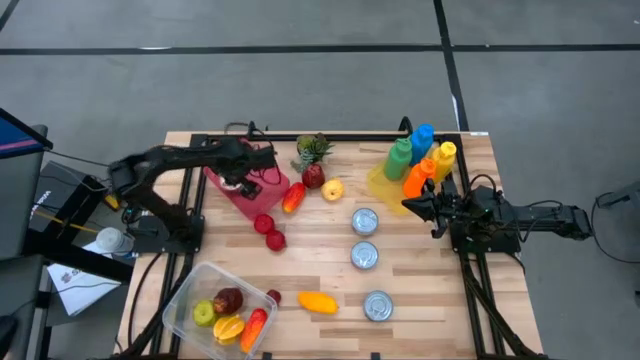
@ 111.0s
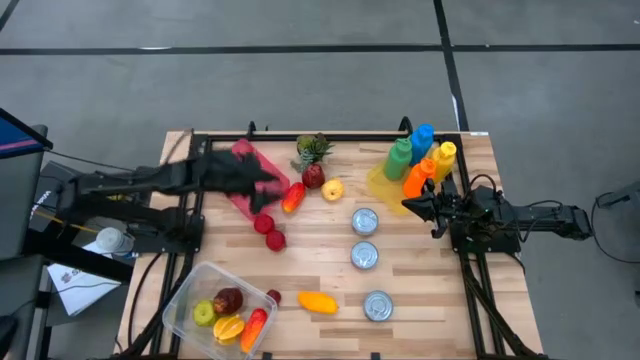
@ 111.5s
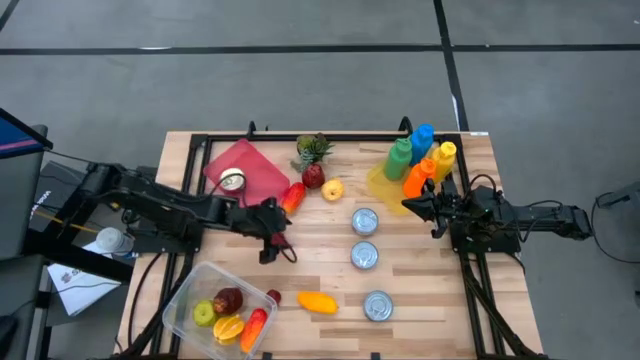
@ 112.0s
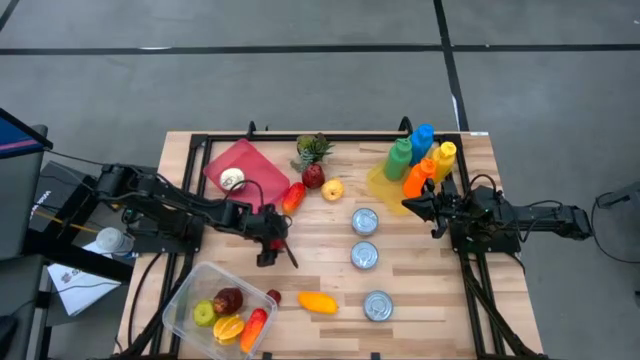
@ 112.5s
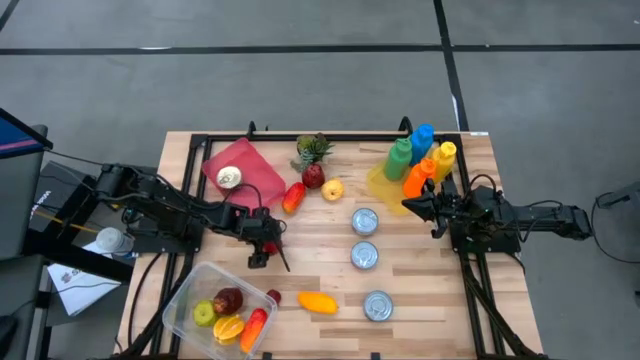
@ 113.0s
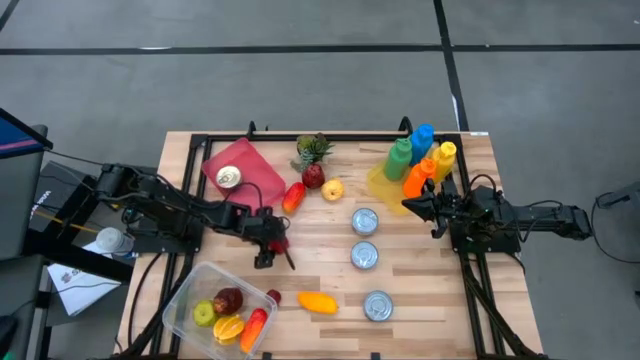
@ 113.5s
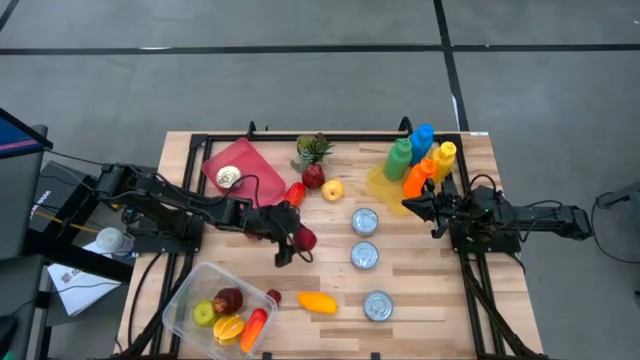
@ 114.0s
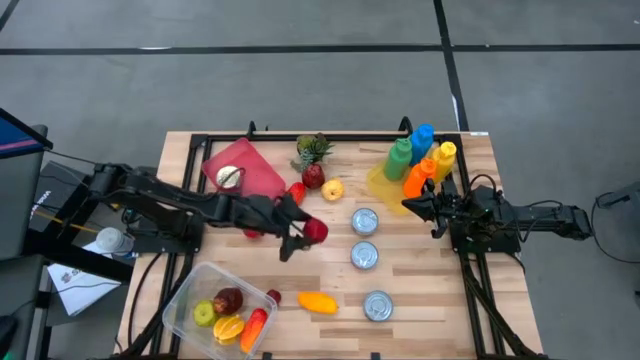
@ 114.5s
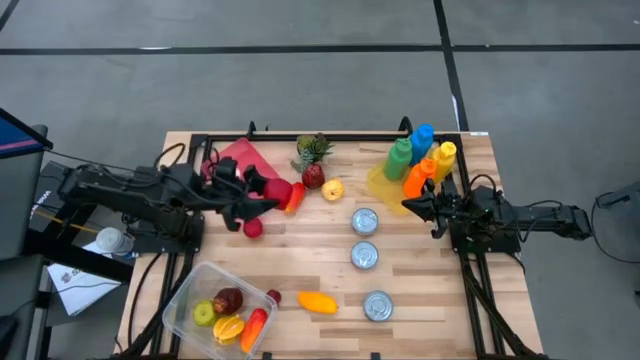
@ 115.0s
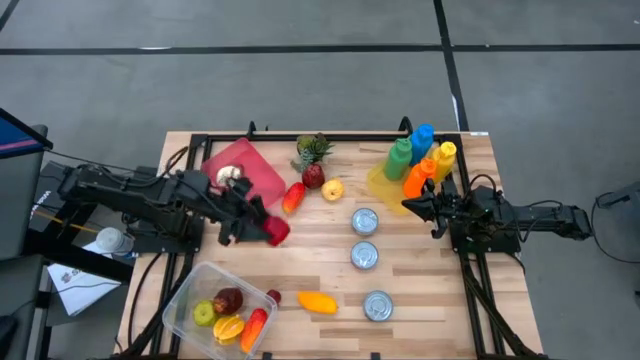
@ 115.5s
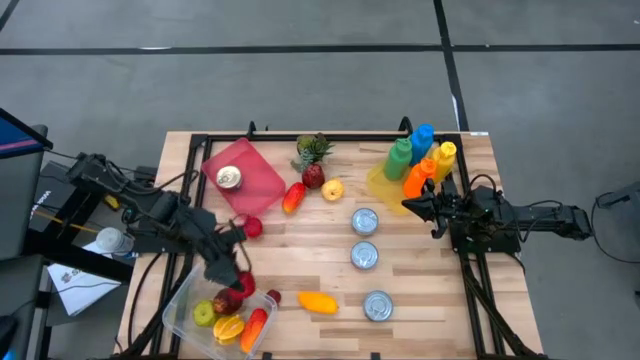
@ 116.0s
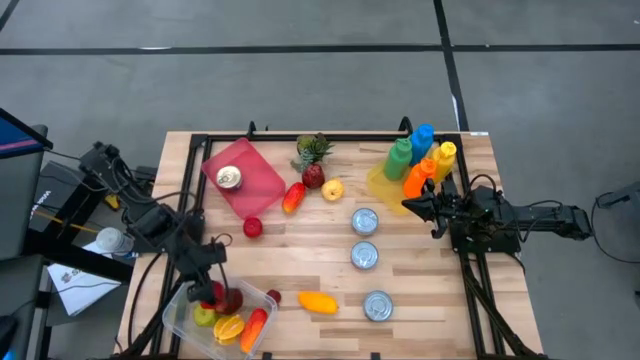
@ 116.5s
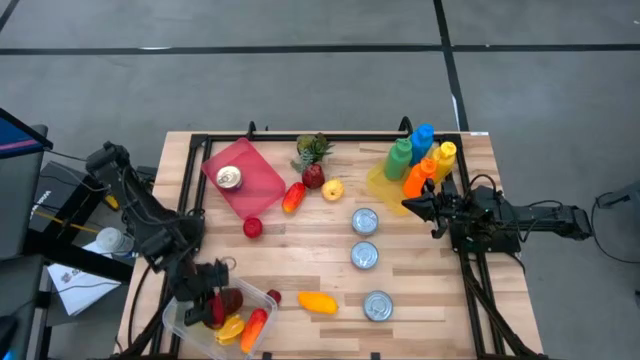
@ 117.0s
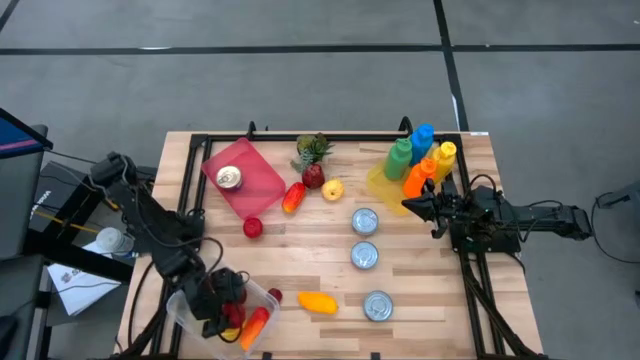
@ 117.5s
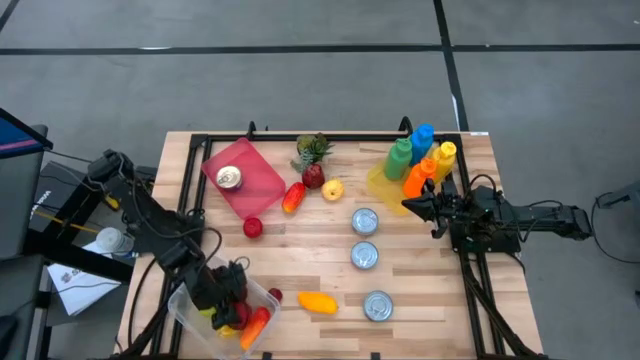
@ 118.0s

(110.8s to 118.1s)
Task: Pick & Place Food Item
Put the bottom red tomato into the transparent bin

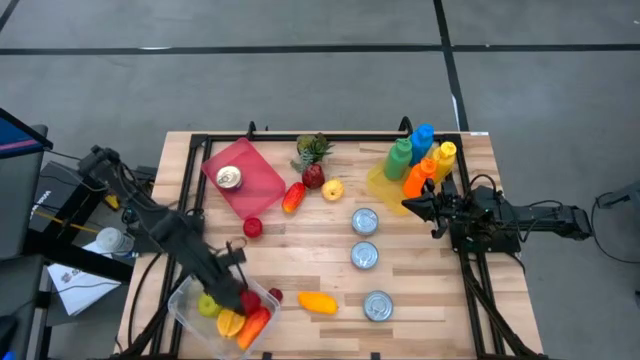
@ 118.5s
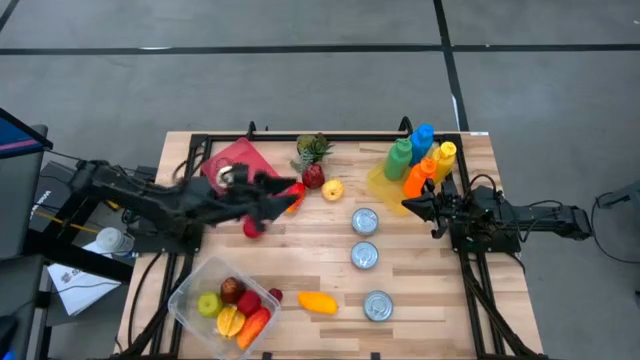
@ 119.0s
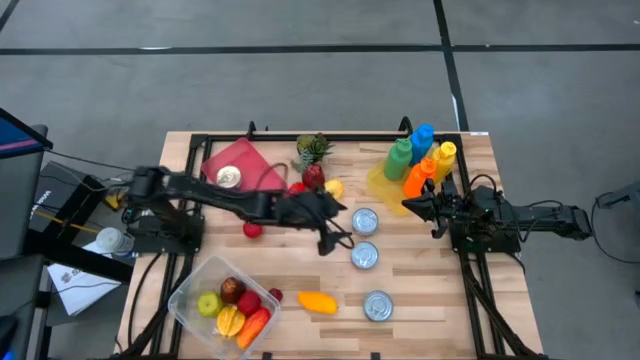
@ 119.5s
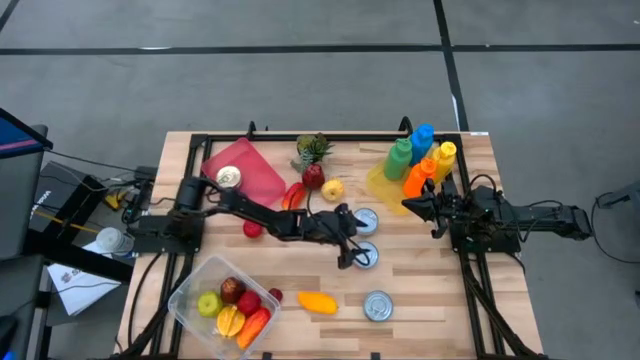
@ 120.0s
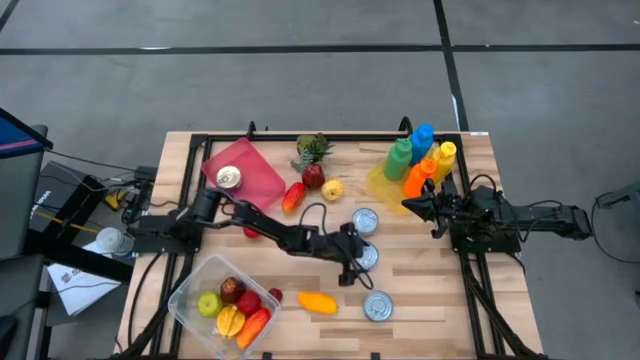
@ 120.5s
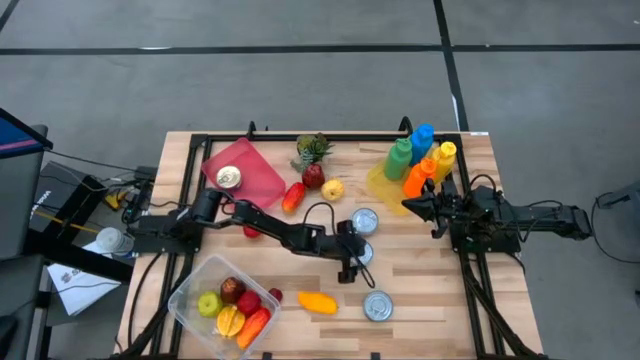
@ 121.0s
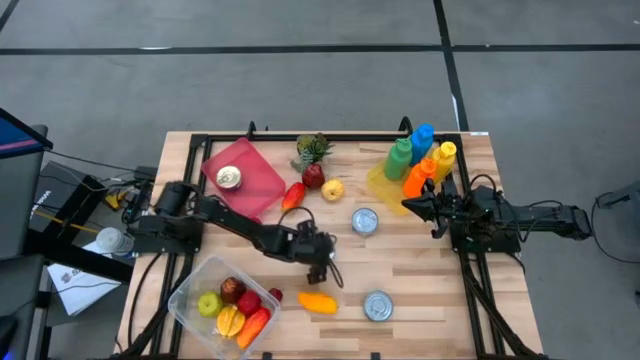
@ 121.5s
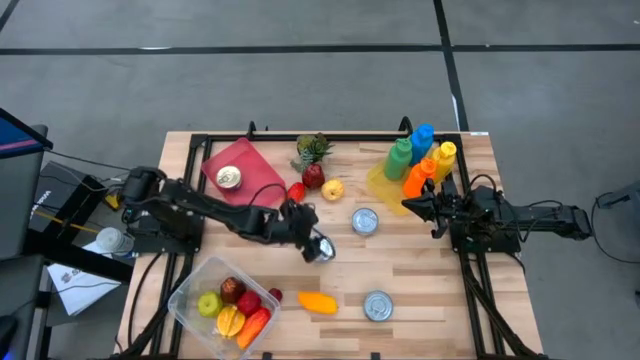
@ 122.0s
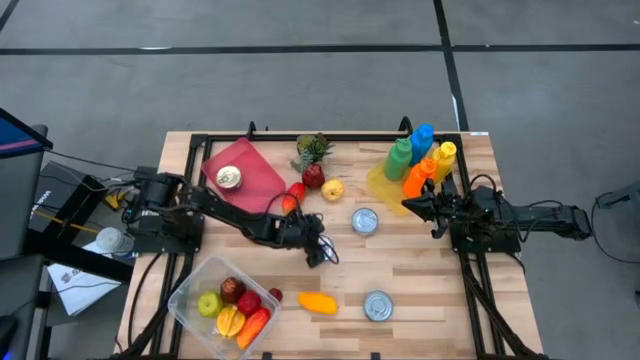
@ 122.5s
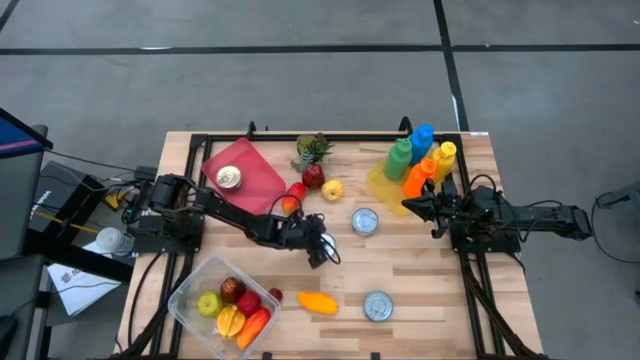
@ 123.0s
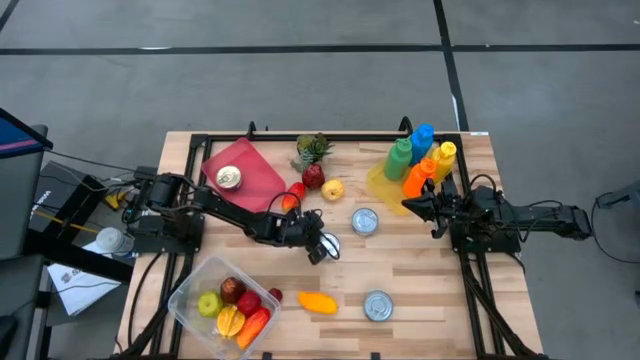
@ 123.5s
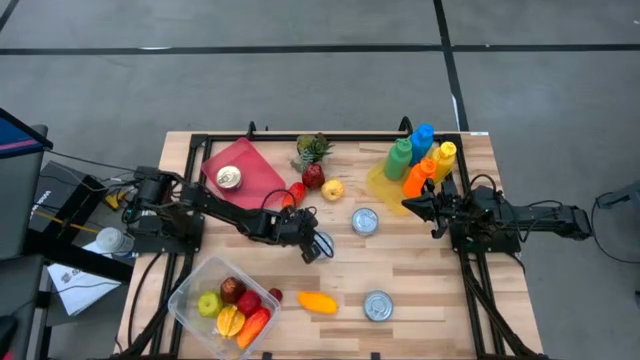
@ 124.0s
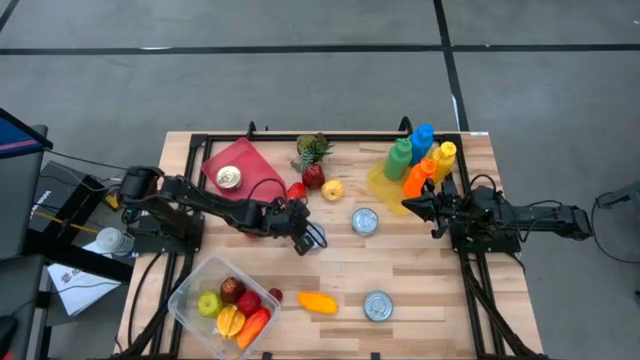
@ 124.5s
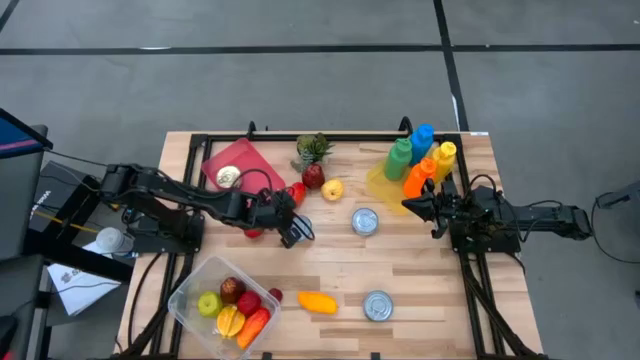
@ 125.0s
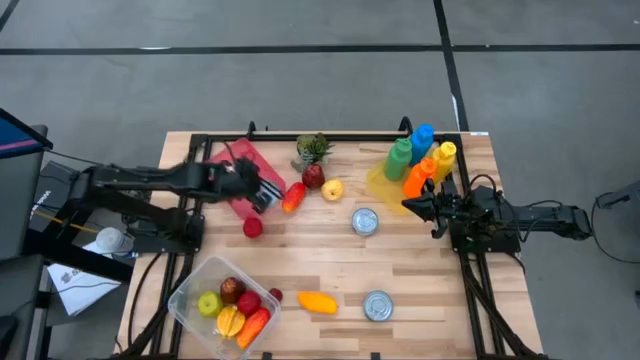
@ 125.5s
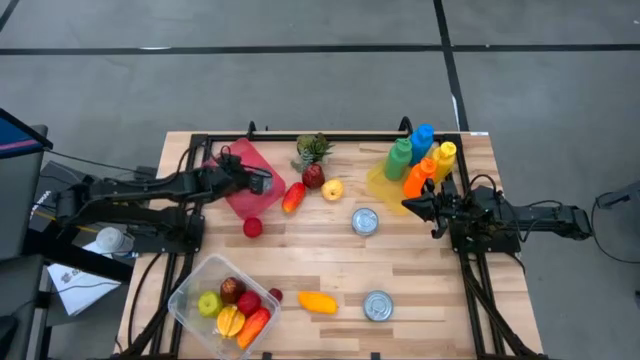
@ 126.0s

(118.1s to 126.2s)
Put the red tuna can into the pink bin

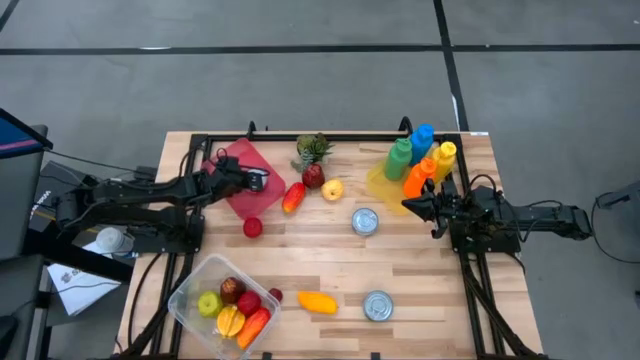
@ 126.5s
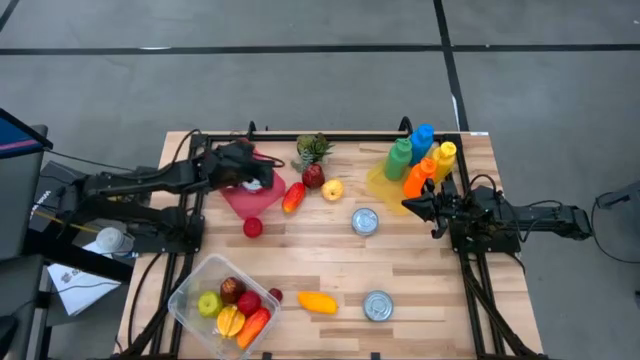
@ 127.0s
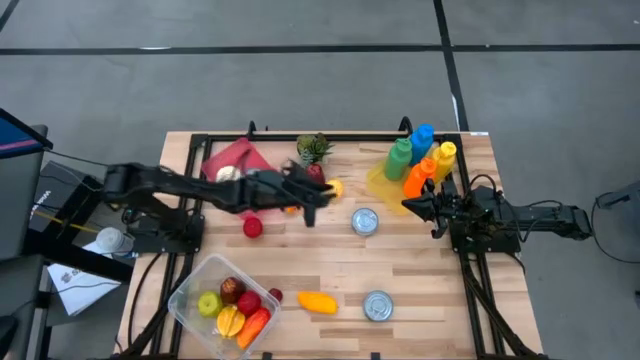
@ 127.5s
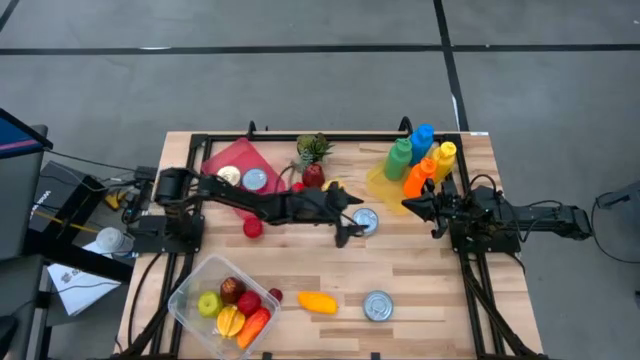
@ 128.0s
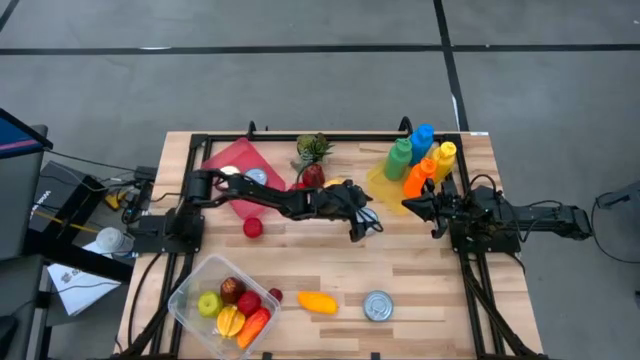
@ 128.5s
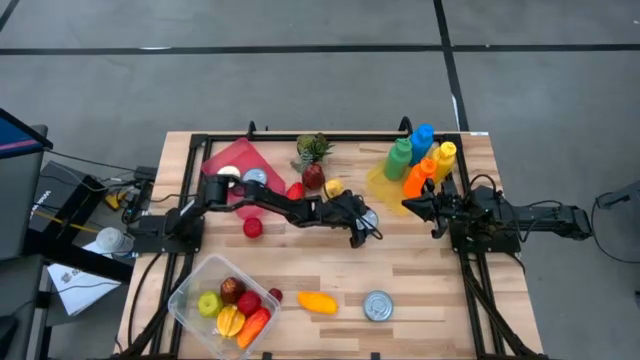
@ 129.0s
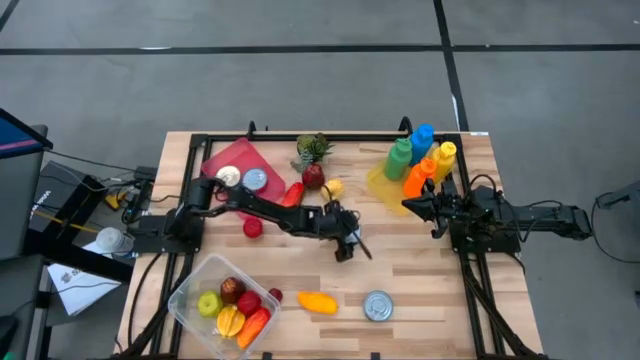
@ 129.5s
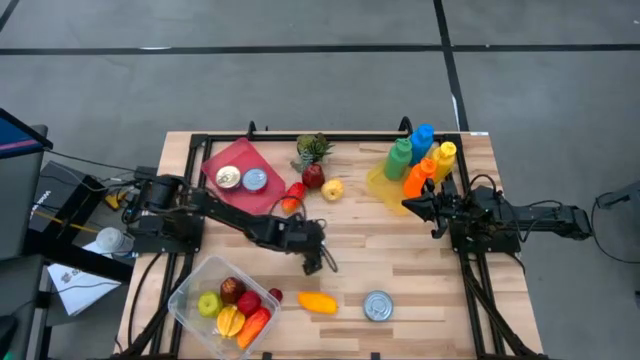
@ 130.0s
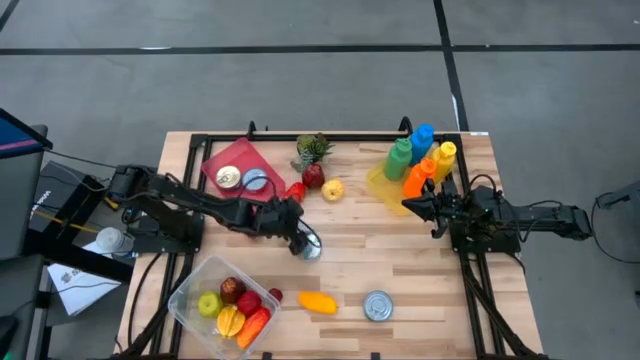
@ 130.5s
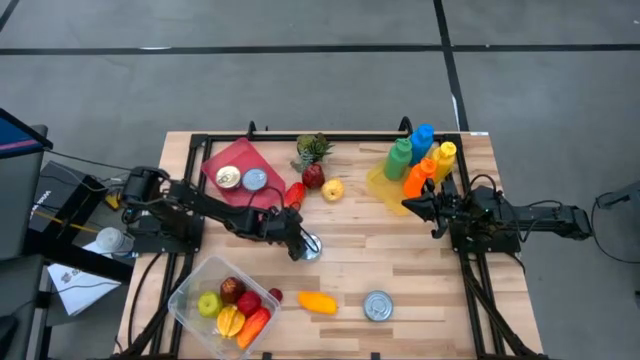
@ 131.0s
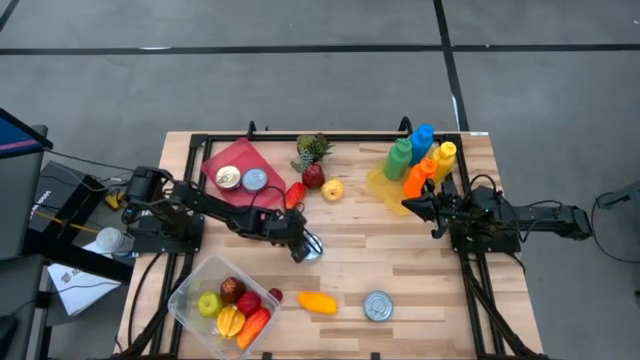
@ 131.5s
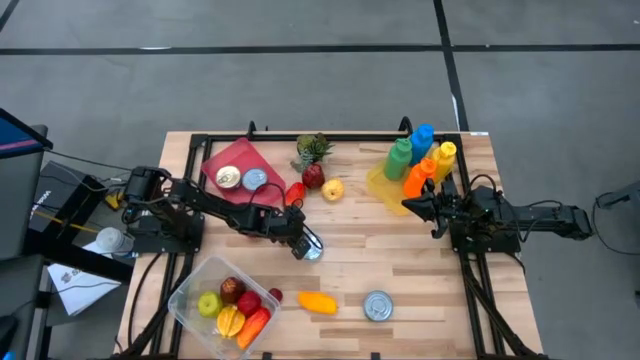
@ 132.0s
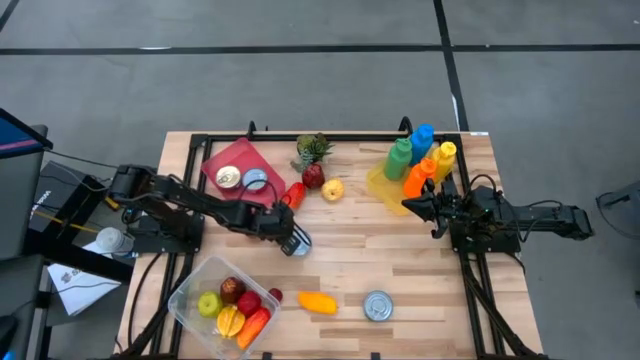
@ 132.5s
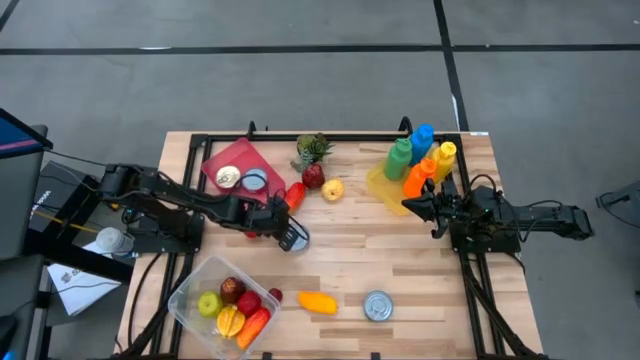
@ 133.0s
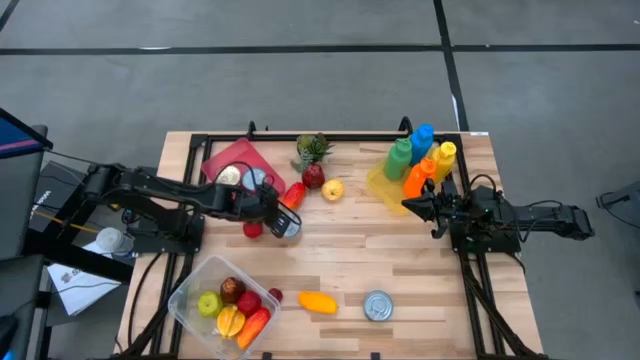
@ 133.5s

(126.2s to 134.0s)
Put the green tuna can into the pink bin

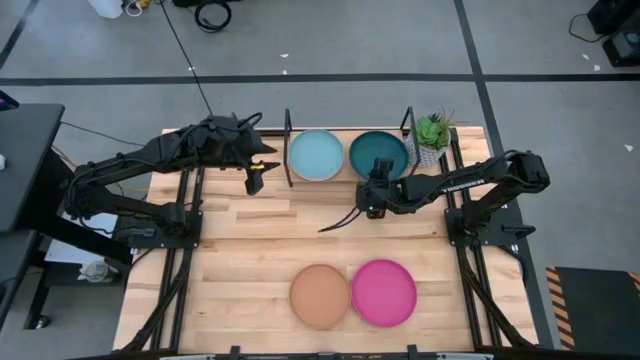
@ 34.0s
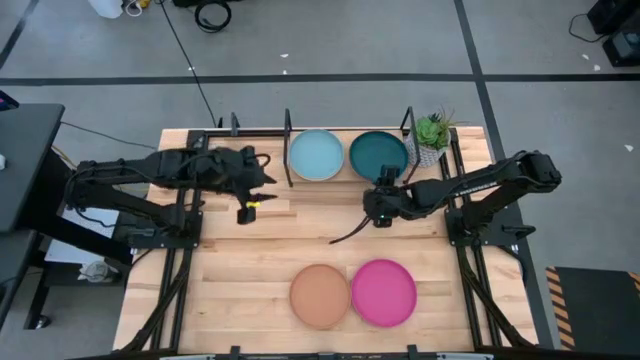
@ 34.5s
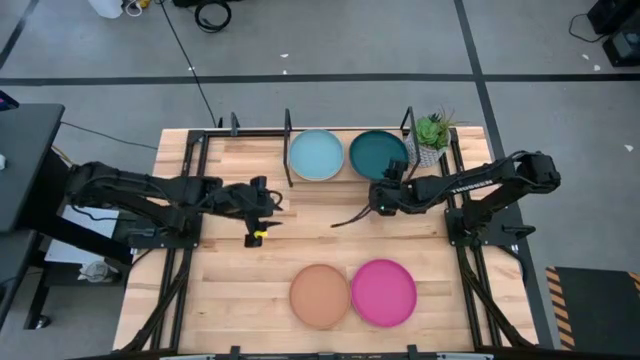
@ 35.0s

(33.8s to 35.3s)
Task: Place and stack plates onto a shelf
Adjust the stacked plate on the right side of the shelf
